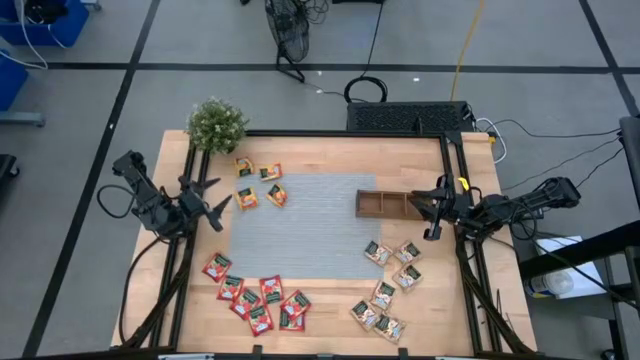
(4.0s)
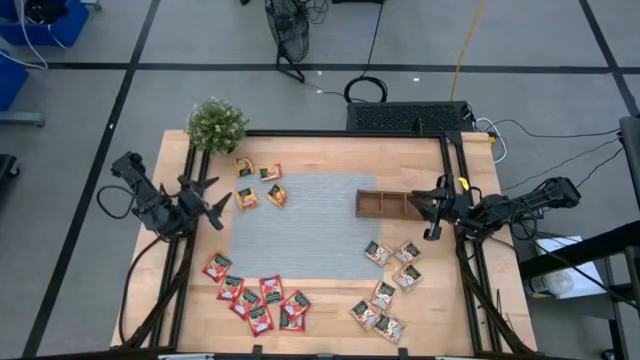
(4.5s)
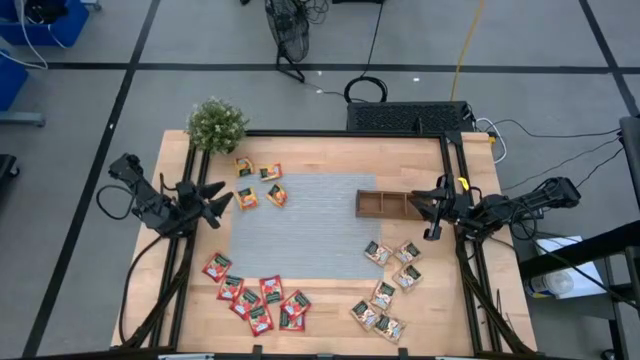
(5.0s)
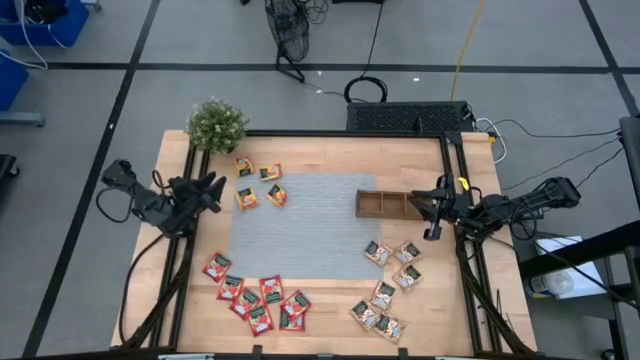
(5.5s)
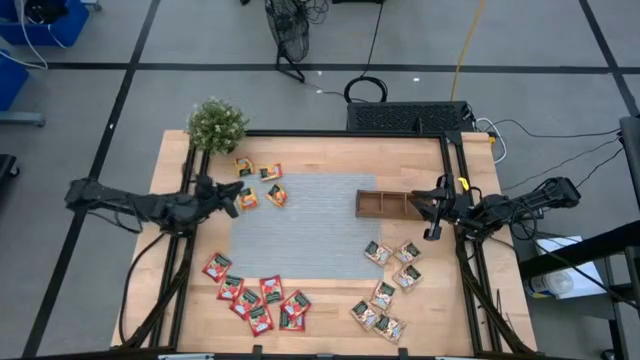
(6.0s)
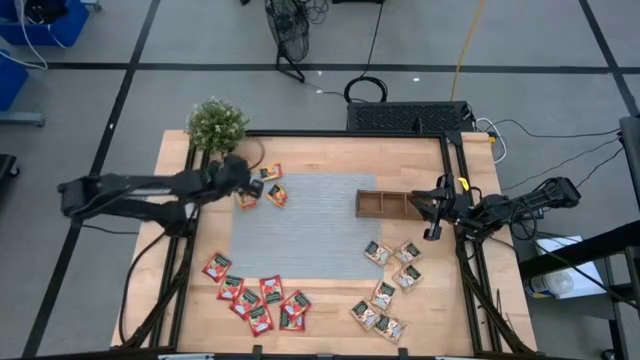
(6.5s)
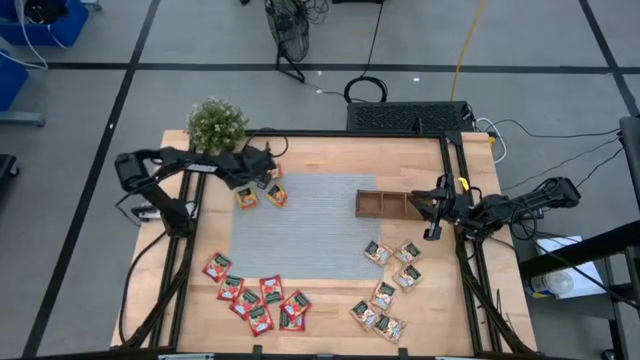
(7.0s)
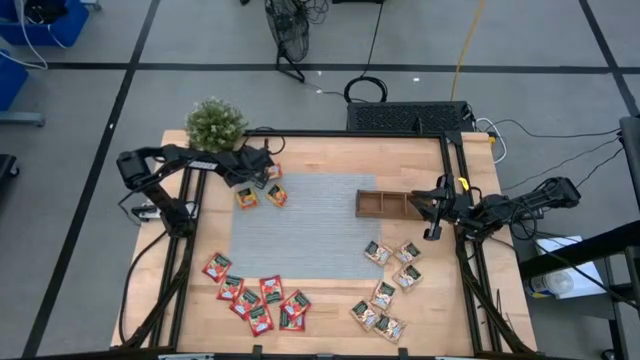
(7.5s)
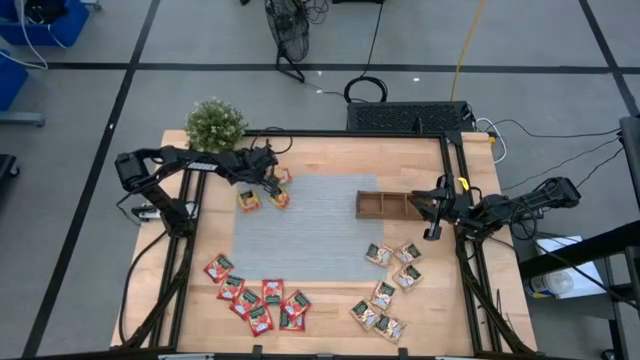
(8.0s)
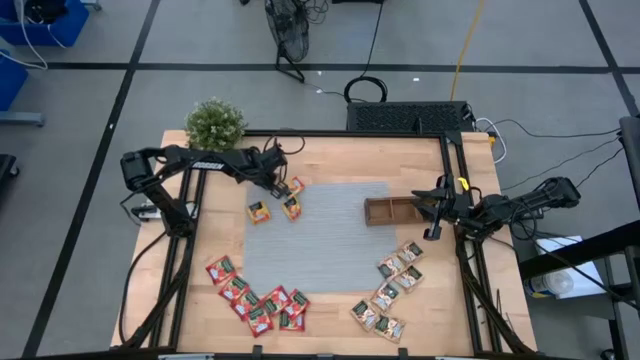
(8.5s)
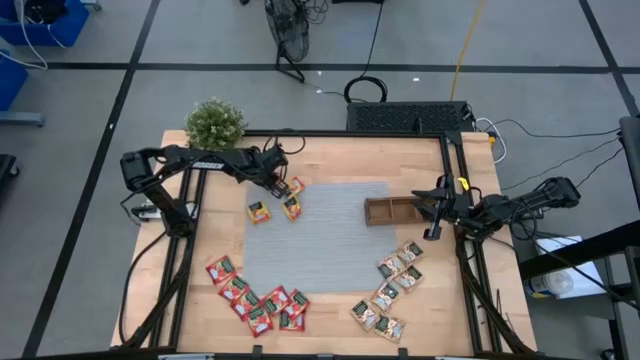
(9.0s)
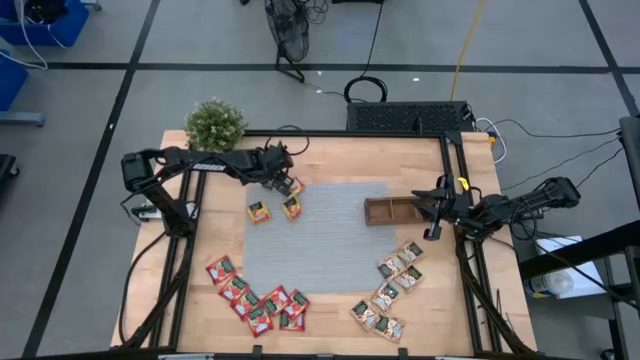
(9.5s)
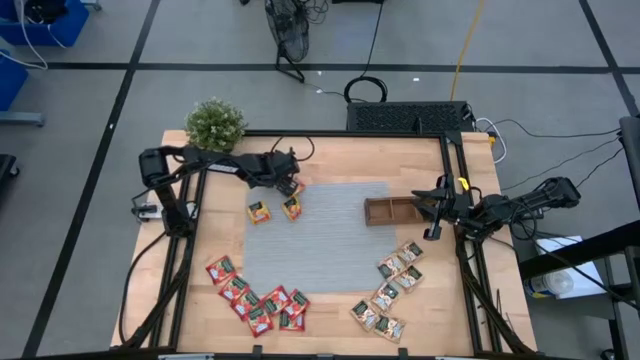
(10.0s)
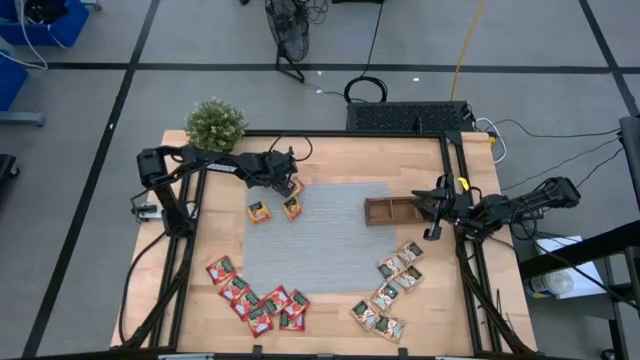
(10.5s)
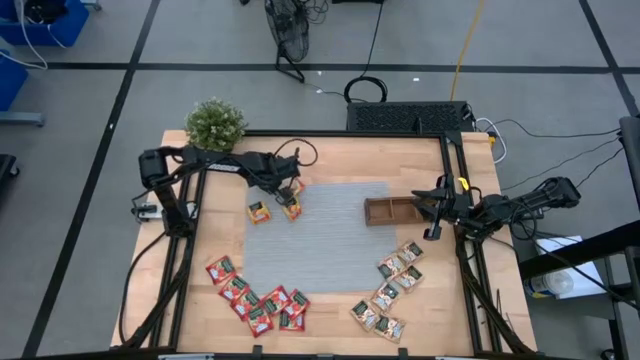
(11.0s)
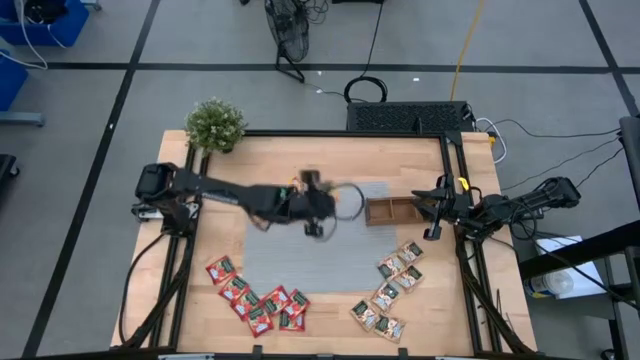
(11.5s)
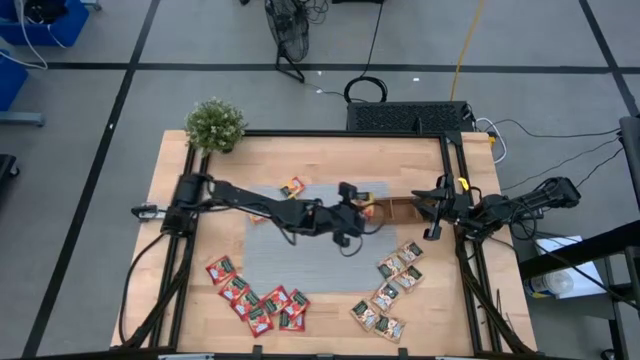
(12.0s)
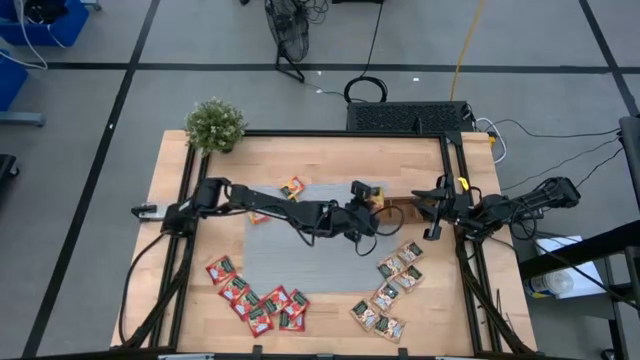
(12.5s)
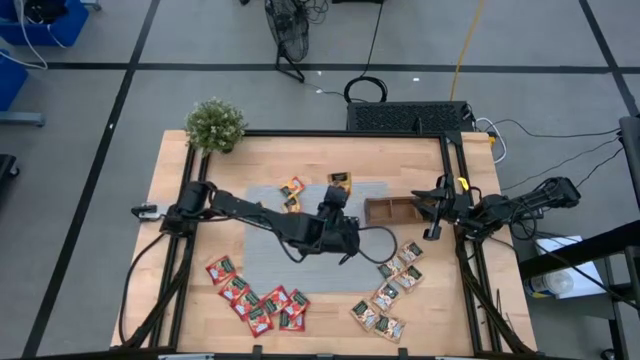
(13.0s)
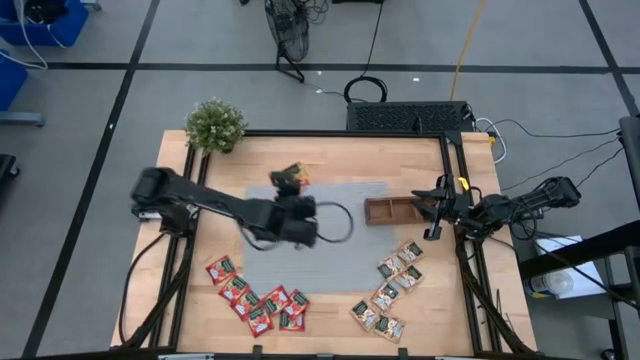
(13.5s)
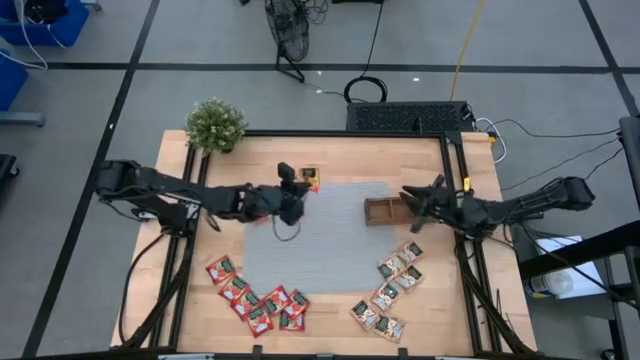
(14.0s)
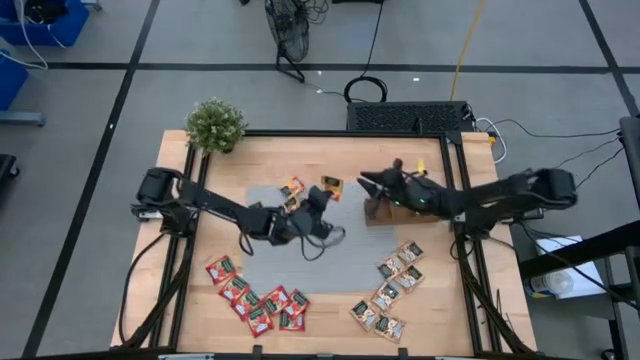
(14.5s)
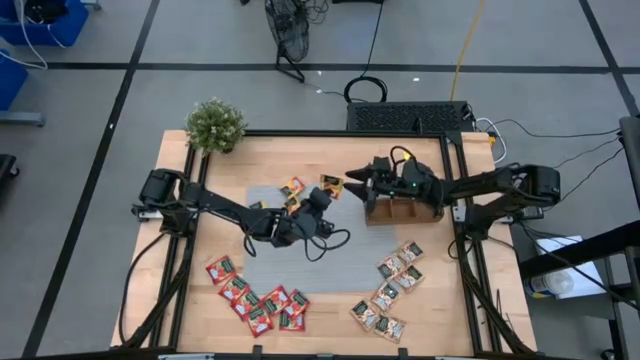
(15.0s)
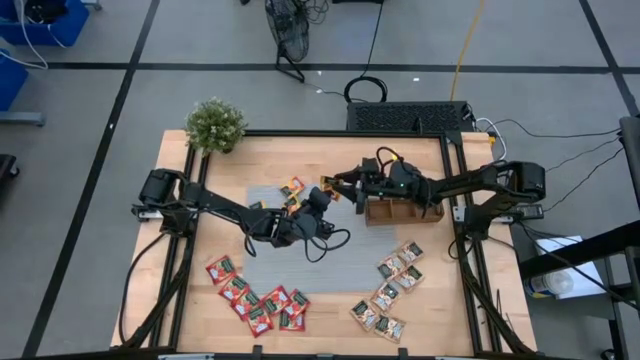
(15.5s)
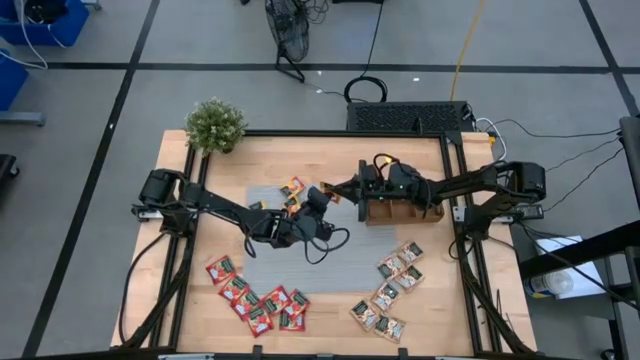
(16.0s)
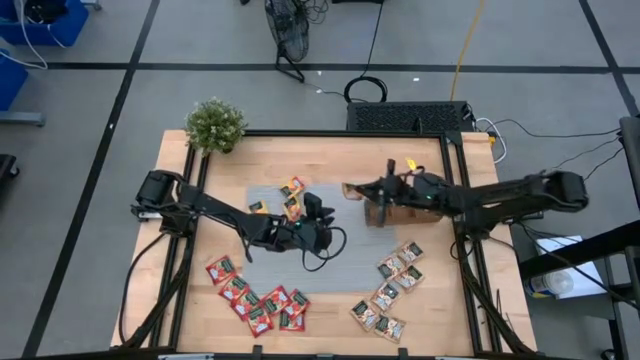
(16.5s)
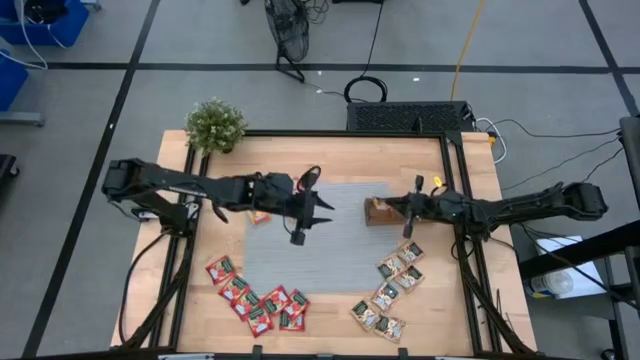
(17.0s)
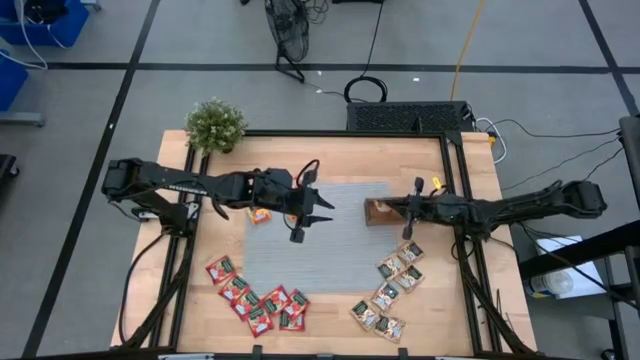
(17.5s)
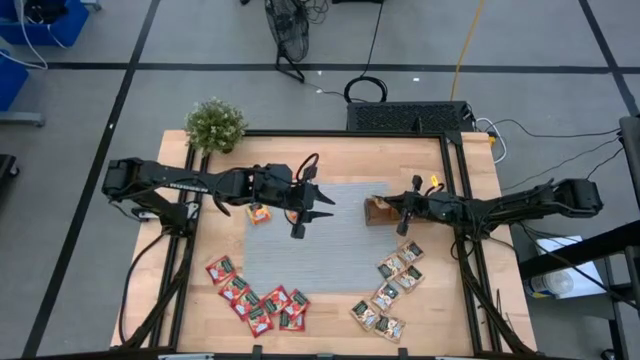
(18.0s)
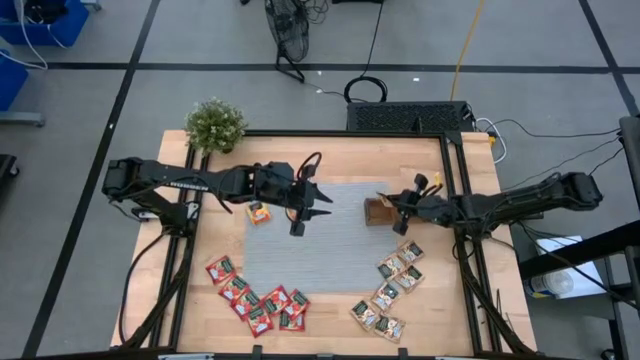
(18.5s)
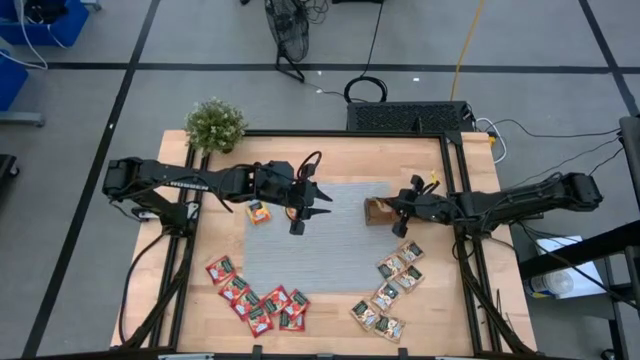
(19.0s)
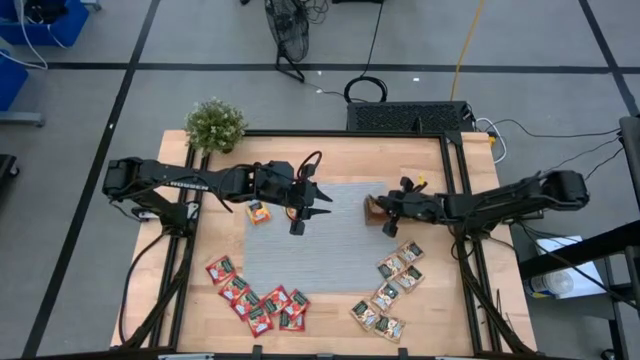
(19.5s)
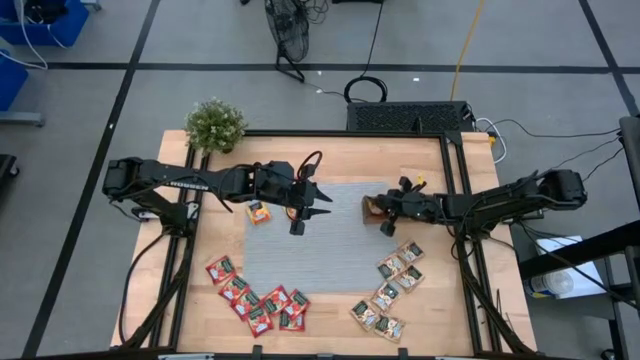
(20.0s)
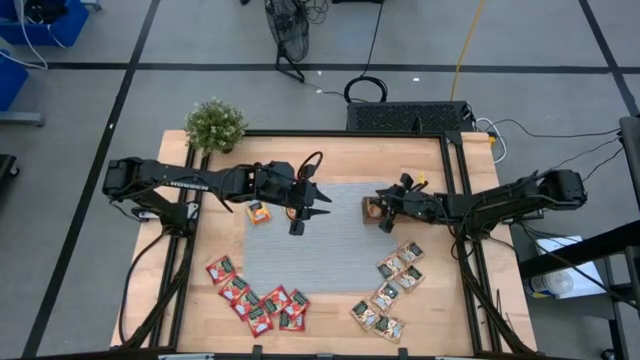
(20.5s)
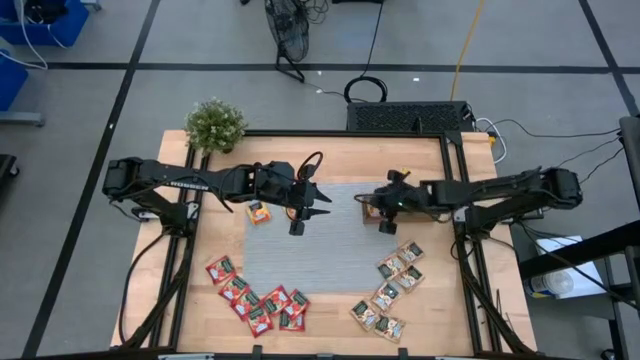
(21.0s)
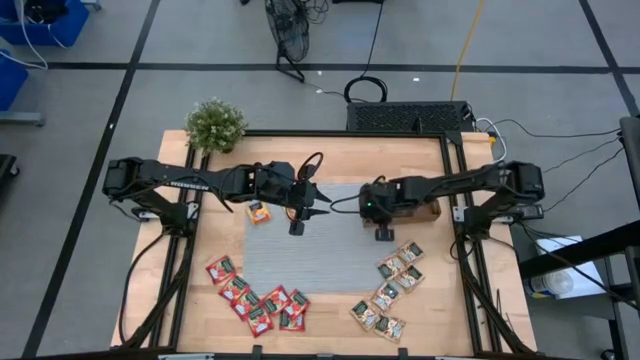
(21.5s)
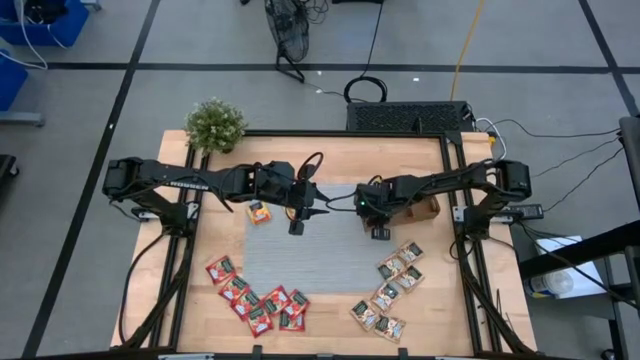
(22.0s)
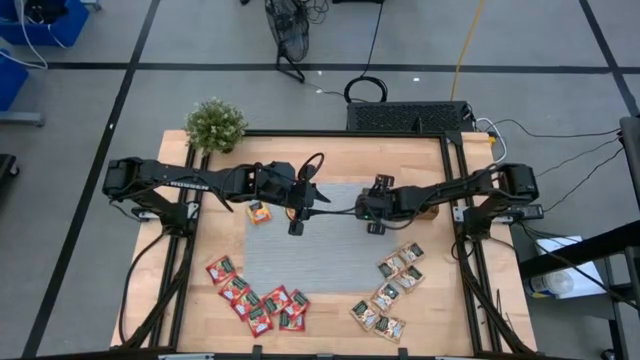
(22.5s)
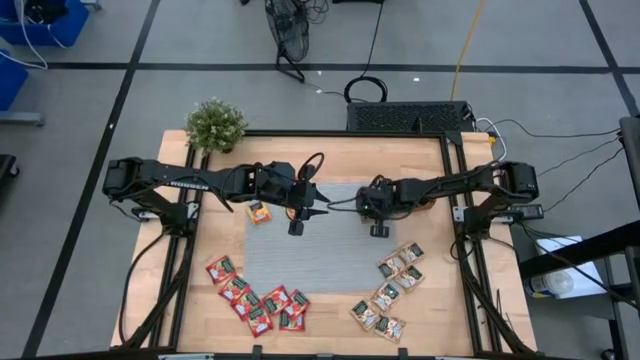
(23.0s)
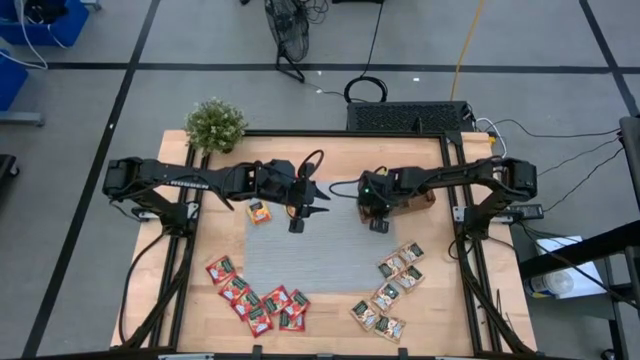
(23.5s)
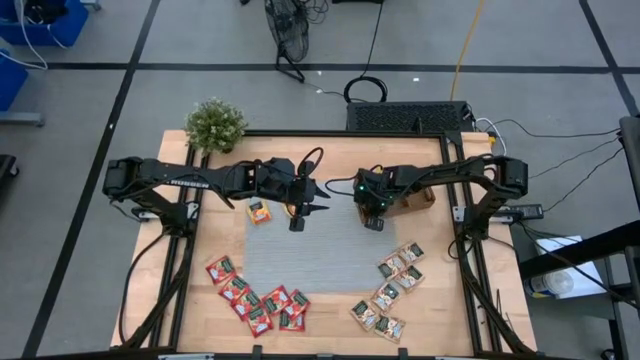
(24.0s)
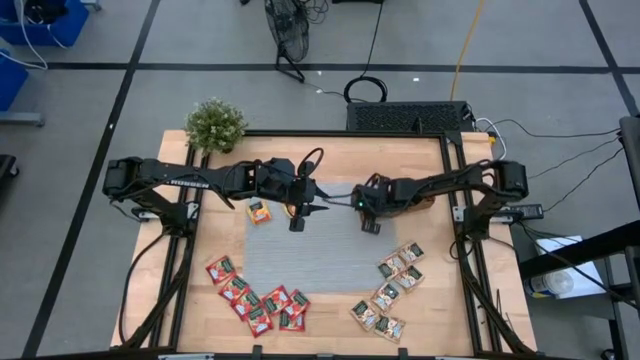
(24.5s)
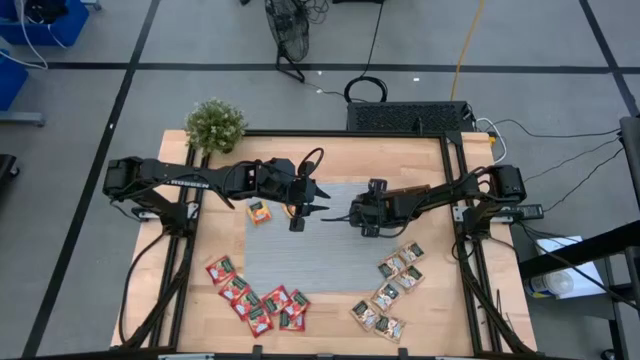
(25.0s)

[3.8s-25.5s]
Task: Pick & Place Tea
Put the yellow tea bag into the left section of the wooden organizer
